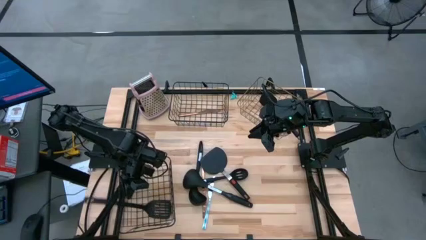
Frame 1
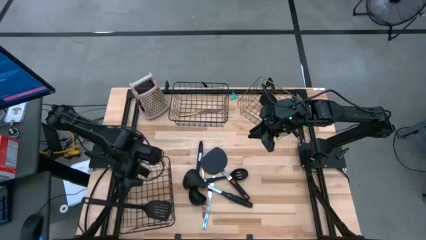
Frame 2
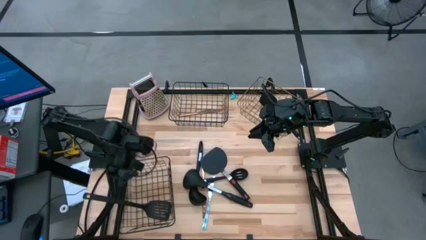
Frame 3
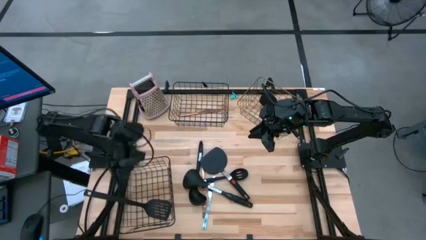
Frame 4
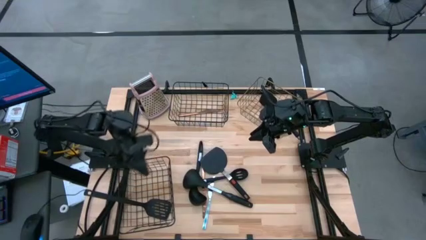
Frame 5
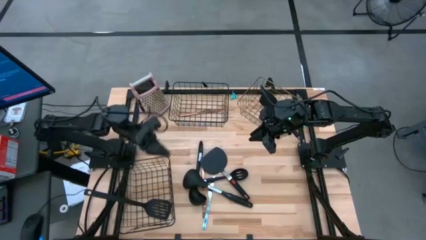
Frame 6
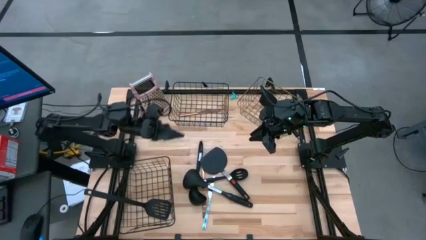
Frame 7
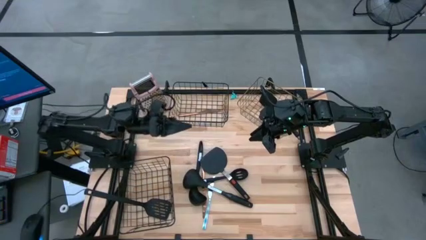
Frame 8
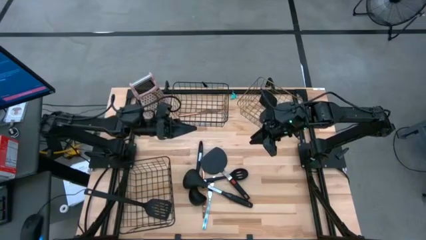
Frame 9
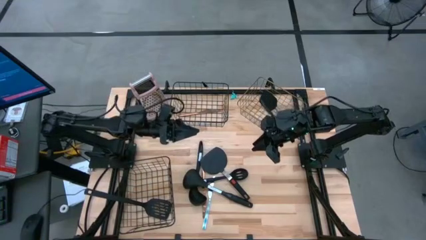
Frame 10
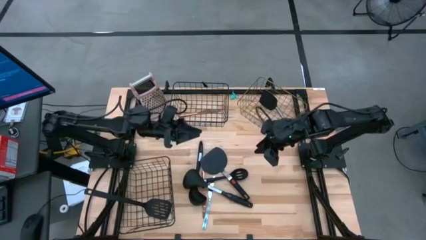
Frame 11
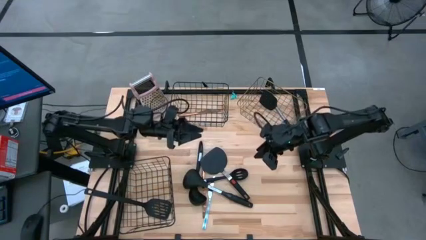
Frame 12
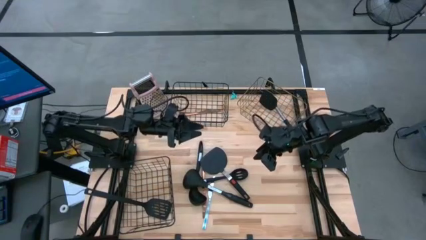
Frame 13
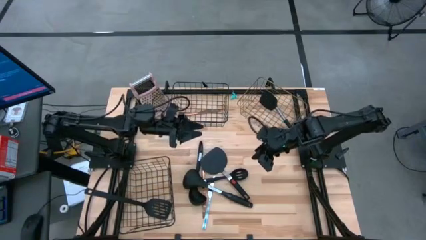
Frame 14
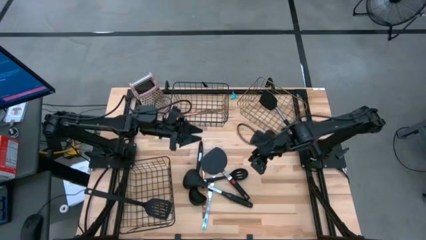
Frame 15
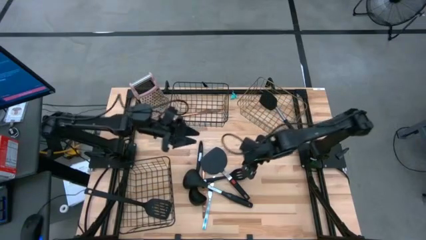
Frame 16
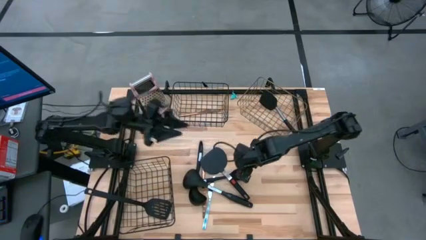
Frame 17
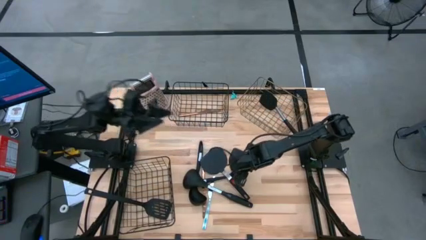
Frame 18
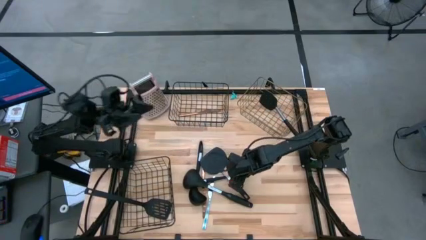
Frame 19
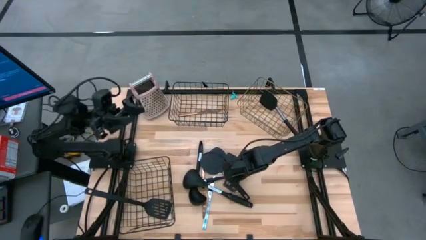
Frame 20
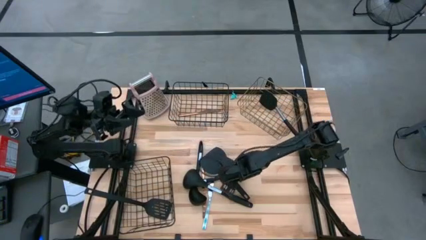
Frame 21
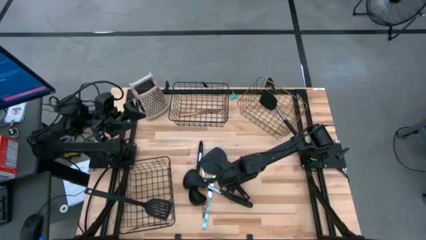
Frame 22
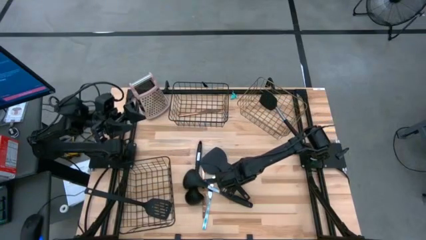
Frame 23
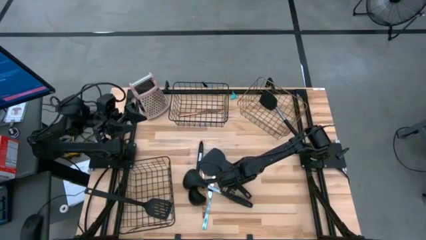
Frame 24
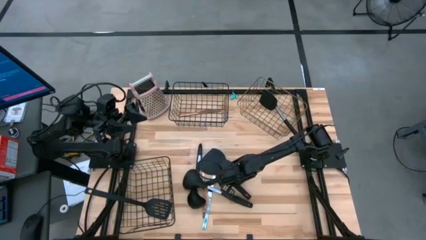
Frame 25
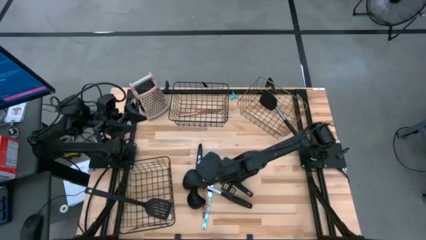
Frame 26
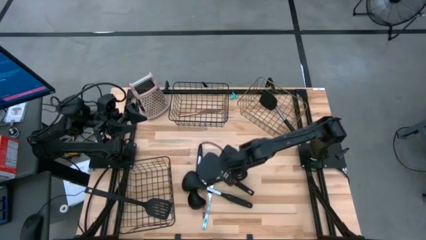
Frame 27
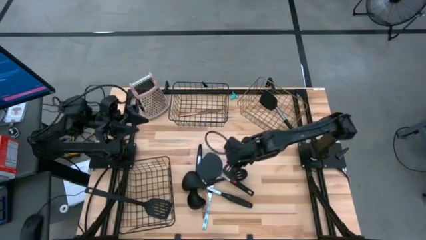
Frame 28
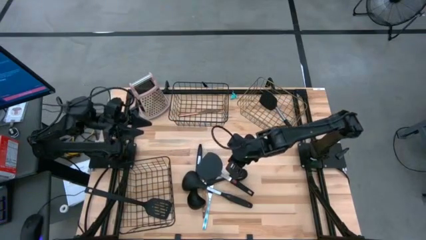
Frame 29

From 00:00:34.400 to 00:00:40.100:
Task: Pick & Place Kitchen Items
Put the black spatula into the brown wire basket

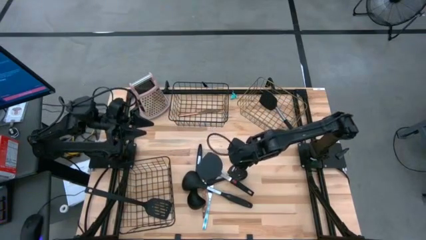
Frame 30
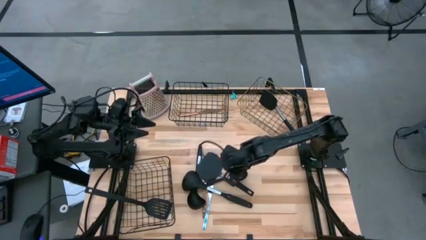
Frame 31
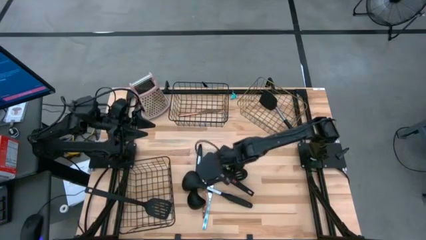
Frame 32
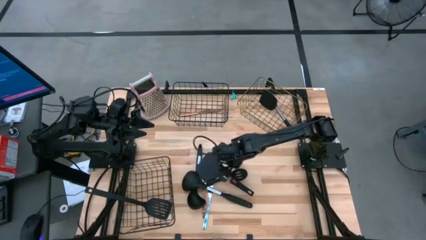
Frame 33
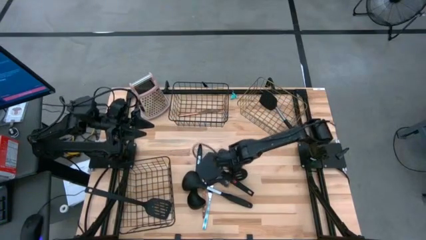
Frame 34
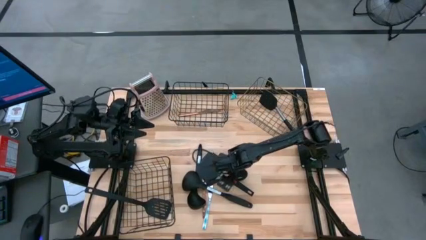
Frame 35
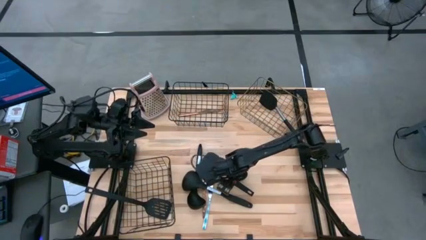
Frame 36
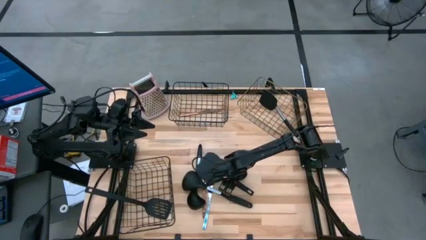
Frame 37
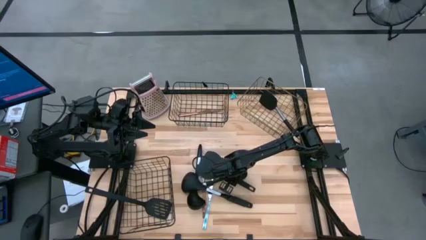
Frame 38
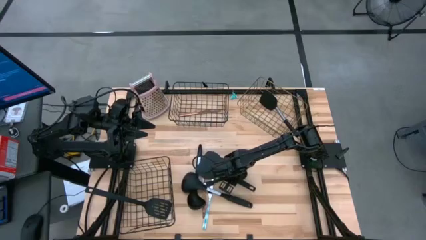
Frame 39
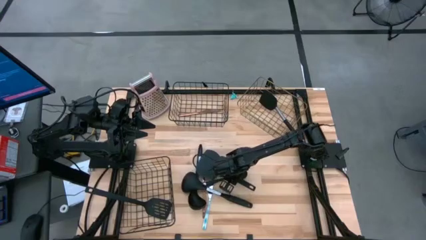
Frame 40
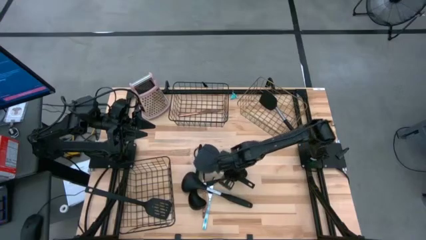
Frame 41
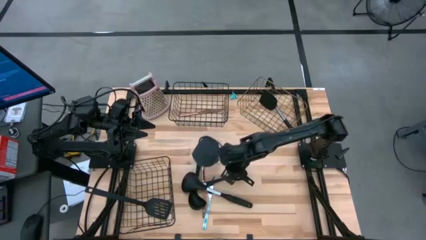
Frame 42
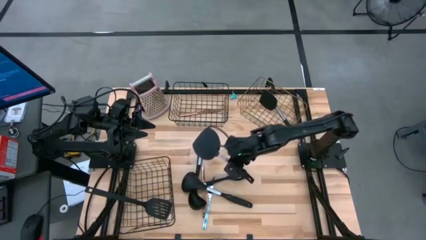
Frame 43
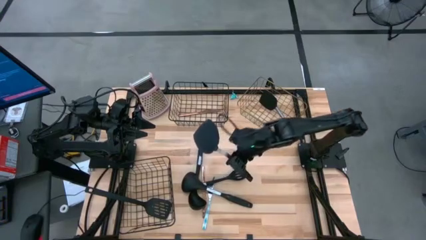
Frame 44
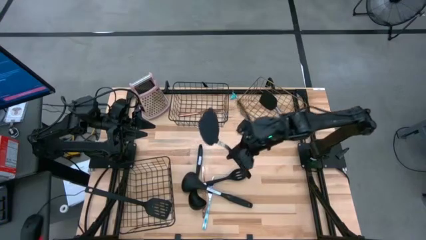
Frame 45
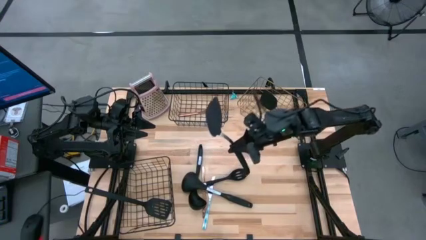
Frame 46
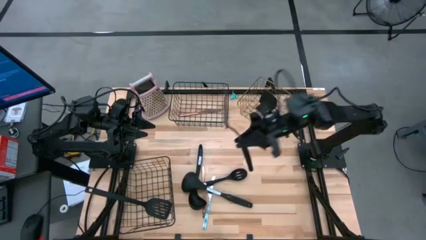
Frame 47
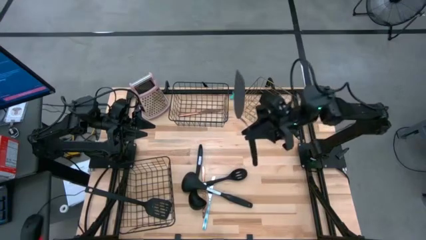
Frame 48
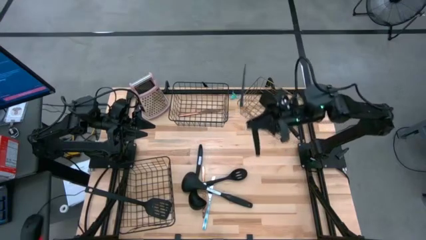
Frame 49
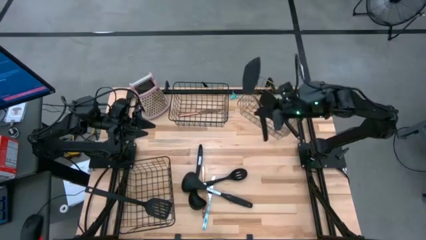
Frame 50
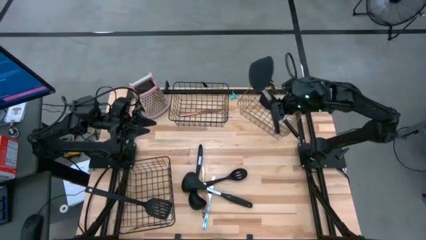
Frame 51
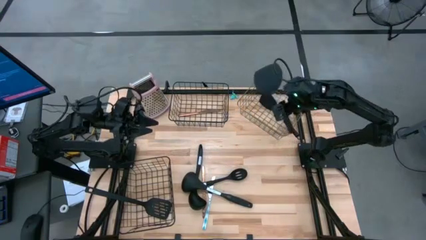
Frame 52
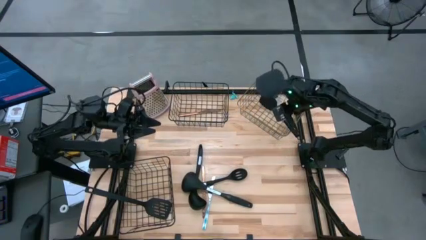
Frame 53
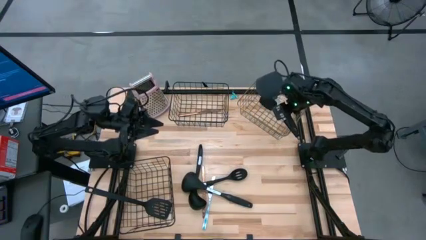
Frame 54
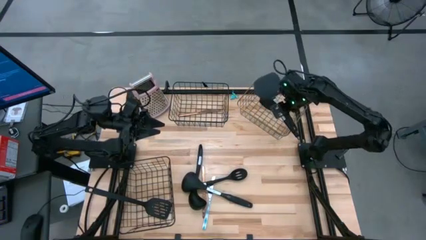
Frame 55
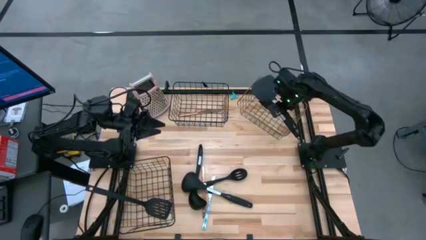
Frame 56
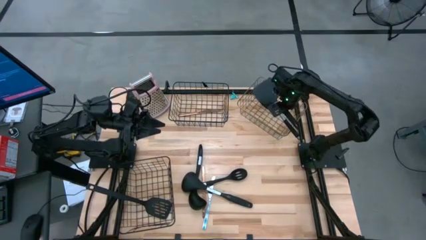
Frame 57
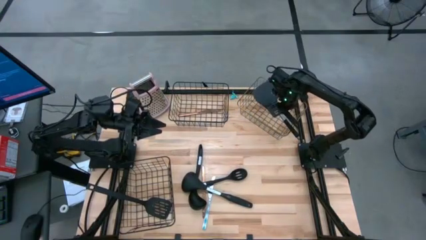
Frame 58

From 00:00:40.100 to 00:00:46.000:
Put the black spatula into the brown wire basket

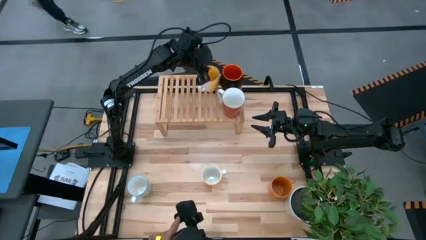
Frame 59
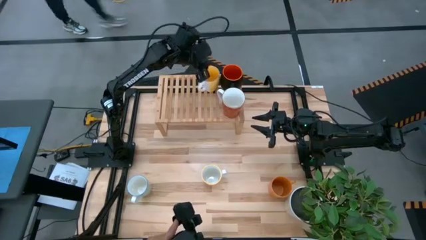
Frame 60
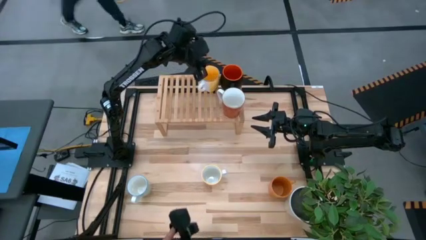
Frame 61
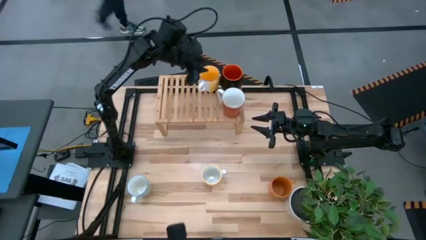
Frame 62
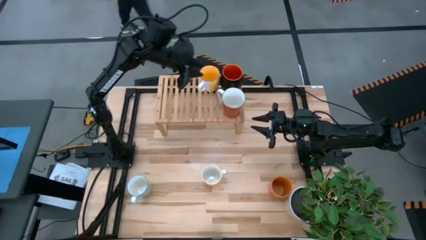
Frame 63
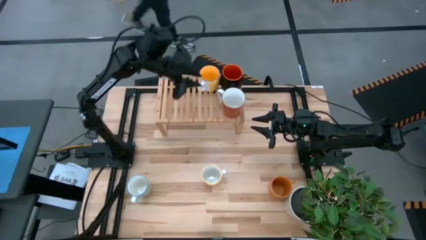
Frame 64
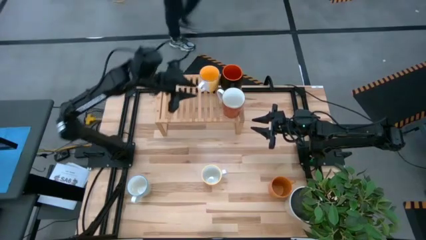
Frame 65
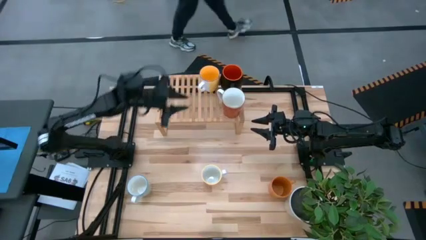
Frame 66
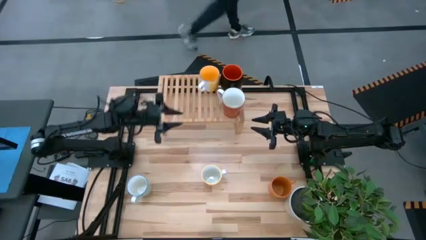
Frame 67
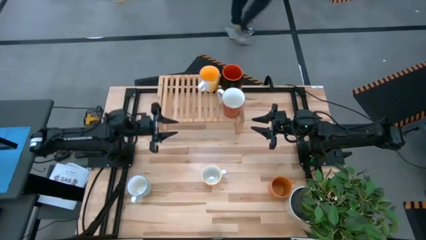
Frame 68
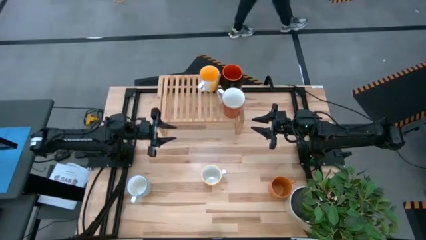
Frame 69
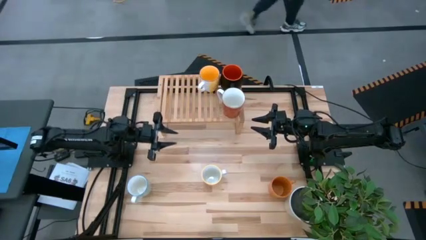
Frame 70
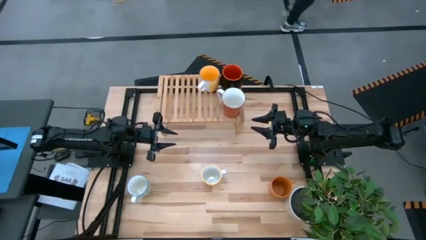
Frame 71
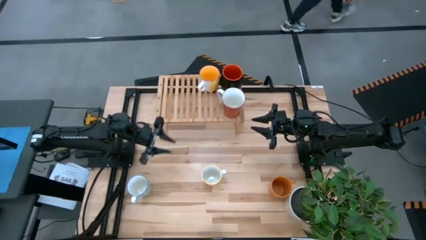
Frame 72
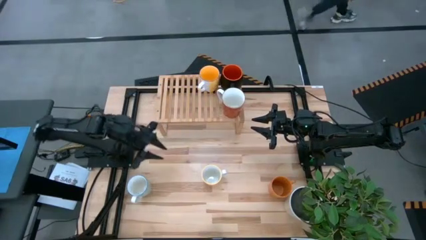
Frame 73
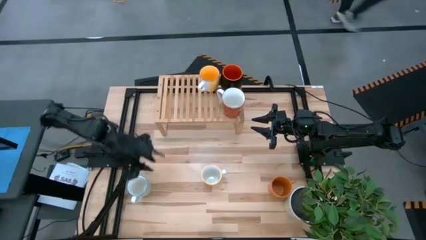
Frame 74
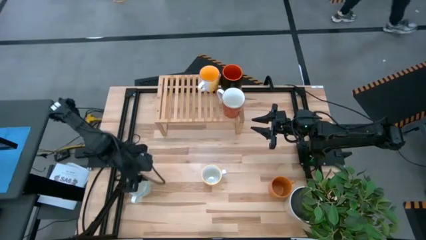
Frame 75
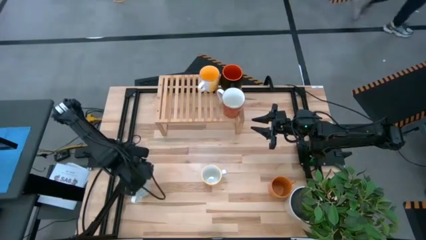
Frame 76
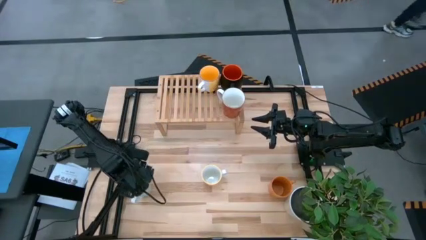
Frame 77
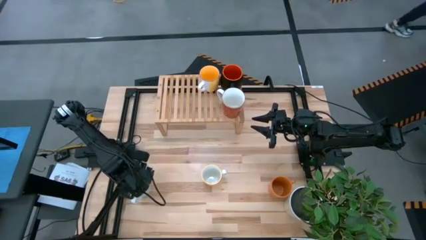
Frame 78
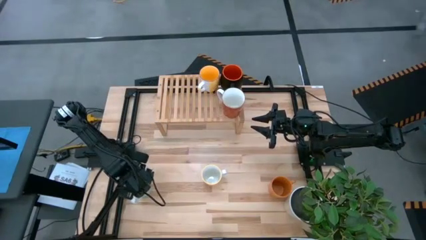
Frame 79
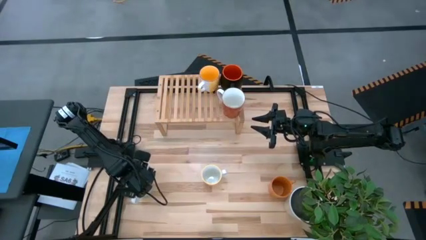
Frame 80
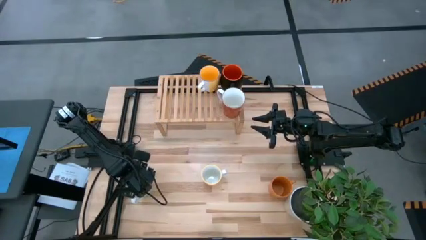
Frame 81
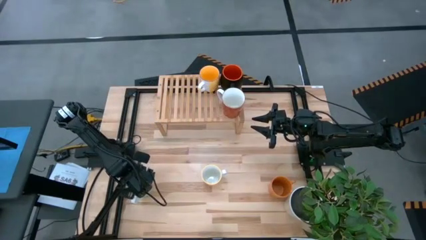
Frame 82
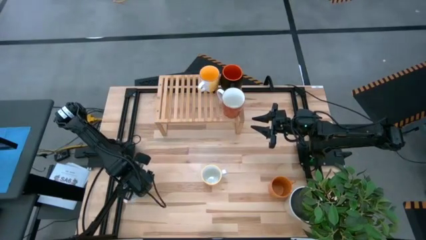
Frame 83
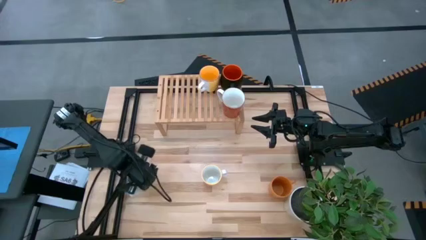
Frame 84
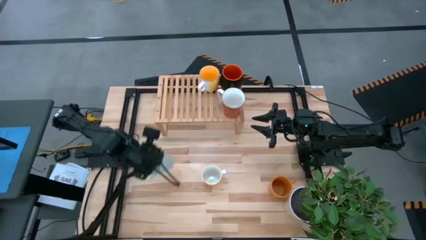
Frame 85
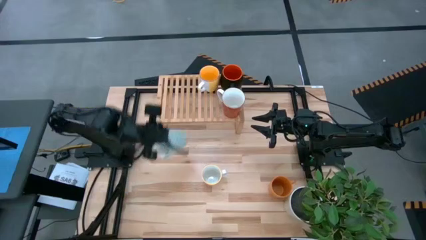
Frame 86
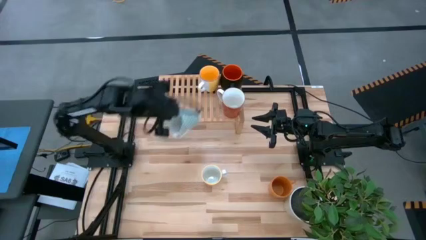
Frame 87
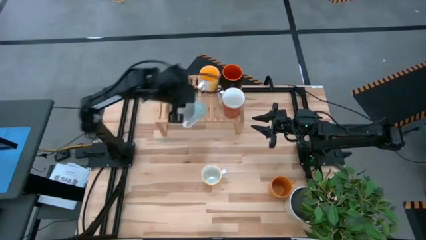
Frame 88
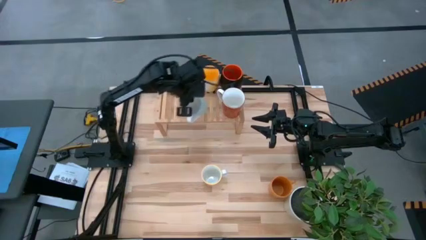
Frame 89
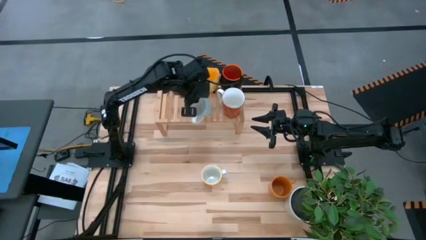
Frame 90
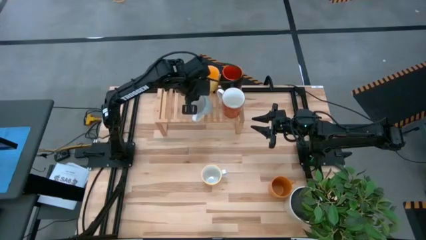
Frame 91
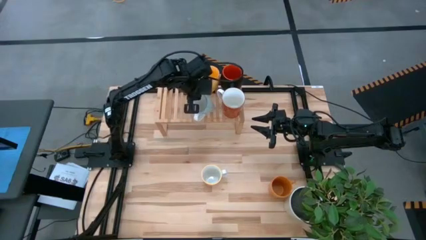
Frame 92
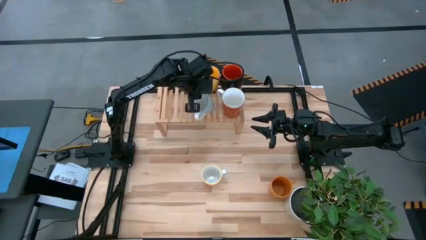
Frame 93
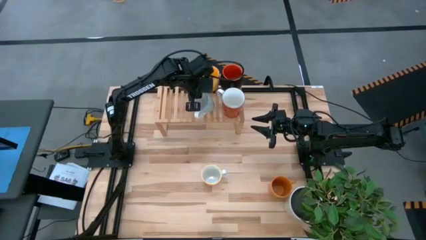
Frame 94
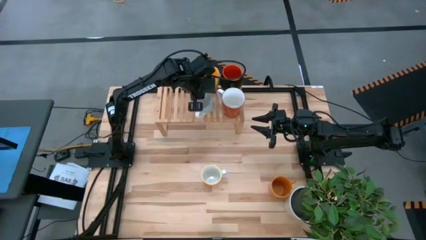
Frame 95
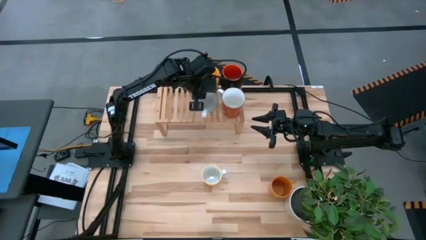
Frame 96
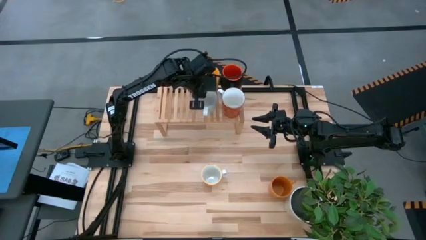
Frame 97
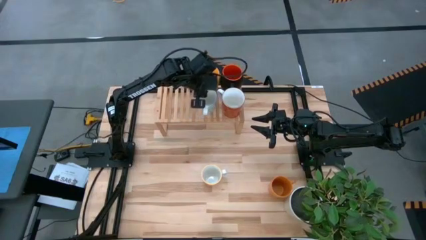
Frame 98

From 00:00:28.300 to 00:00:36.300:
Task: Place coffee mugs
Put the blue patterned mug on the shelf
